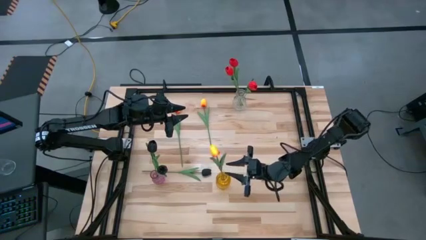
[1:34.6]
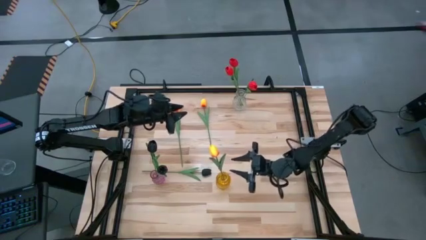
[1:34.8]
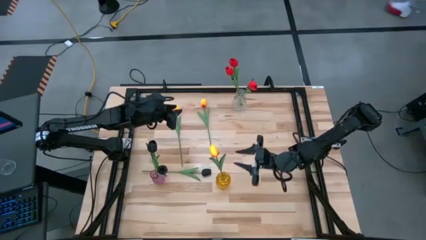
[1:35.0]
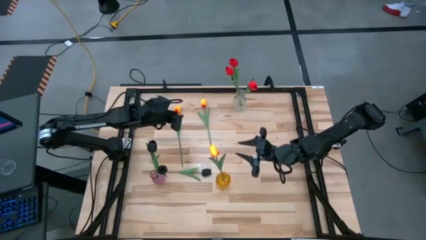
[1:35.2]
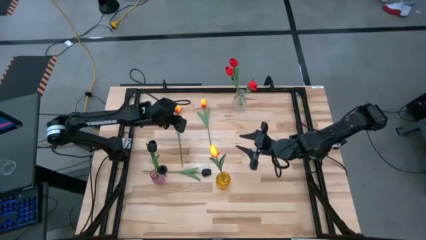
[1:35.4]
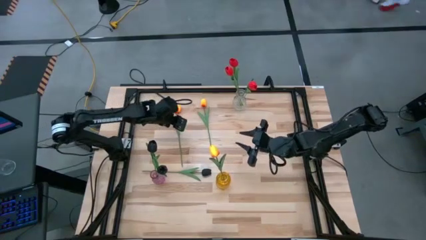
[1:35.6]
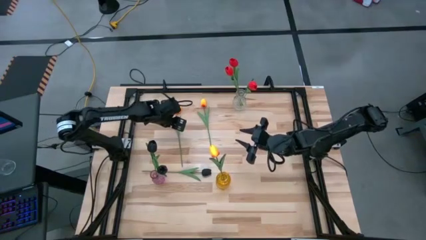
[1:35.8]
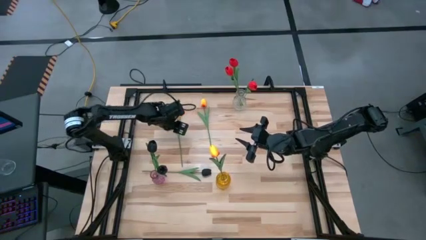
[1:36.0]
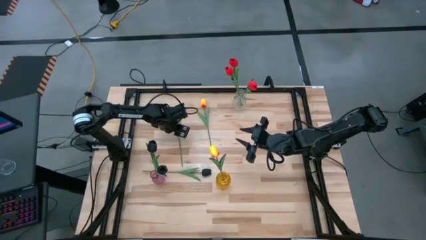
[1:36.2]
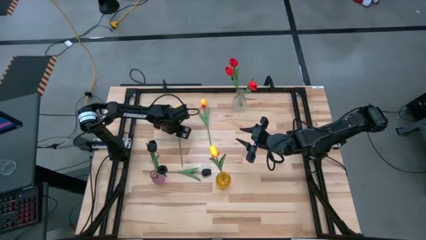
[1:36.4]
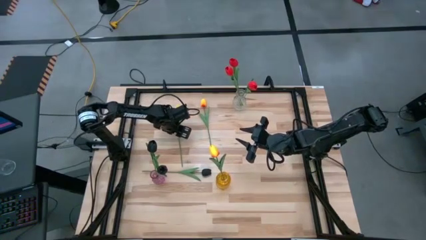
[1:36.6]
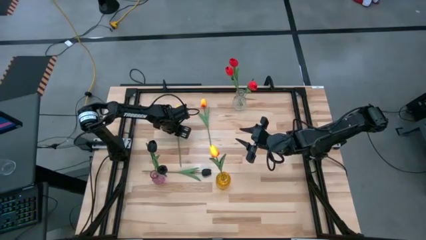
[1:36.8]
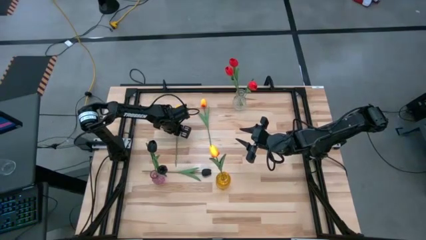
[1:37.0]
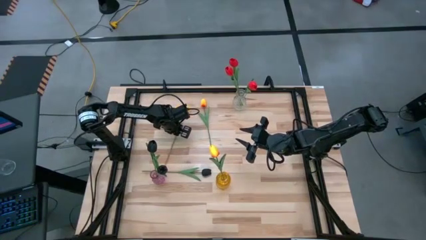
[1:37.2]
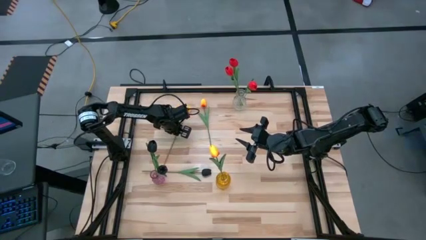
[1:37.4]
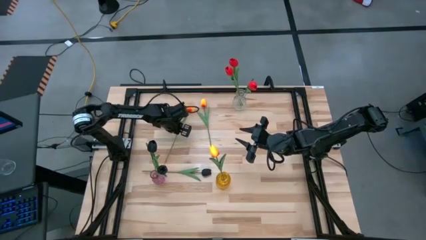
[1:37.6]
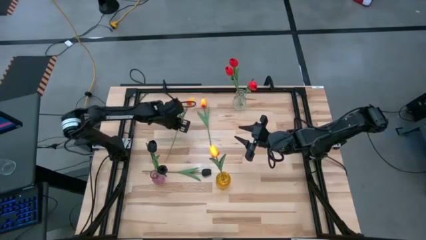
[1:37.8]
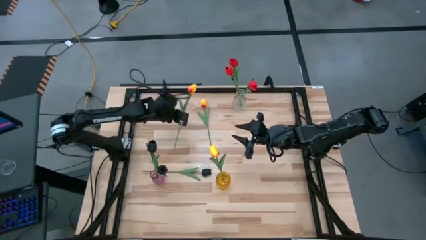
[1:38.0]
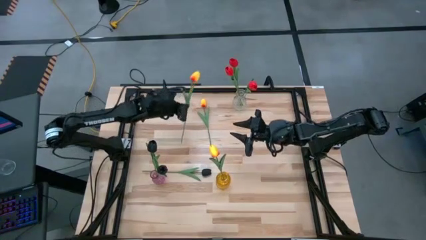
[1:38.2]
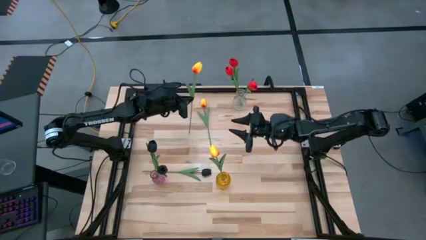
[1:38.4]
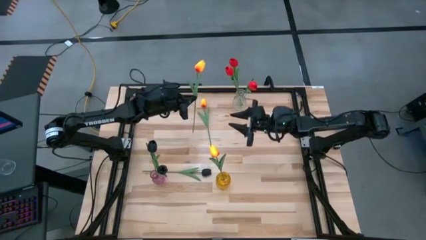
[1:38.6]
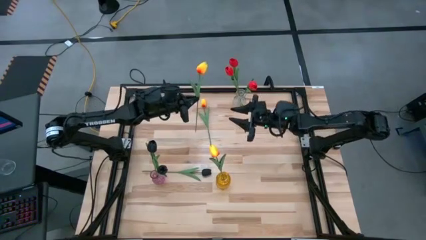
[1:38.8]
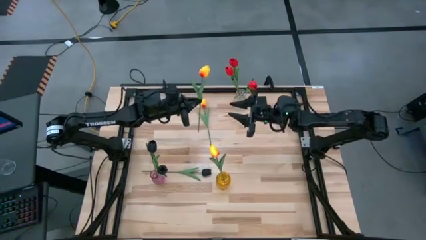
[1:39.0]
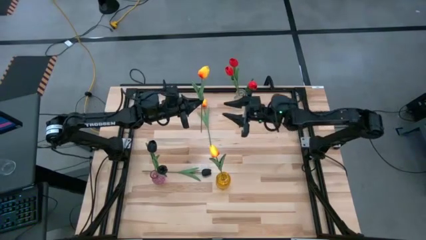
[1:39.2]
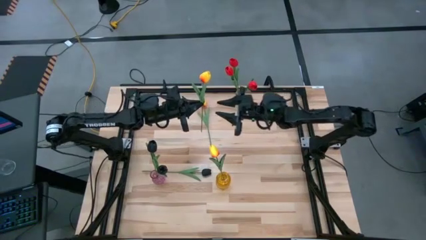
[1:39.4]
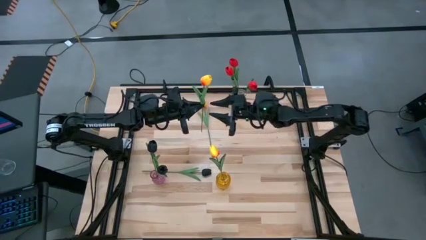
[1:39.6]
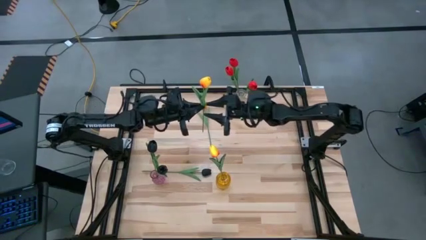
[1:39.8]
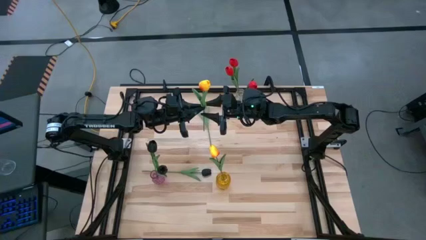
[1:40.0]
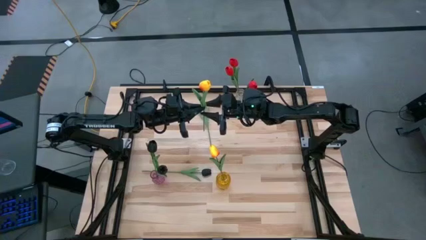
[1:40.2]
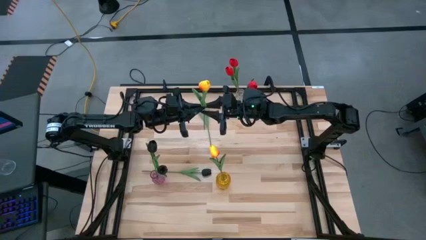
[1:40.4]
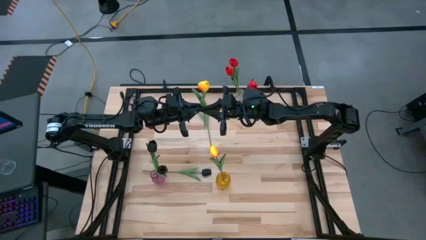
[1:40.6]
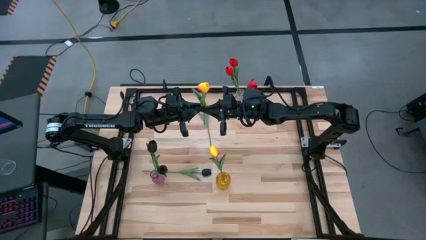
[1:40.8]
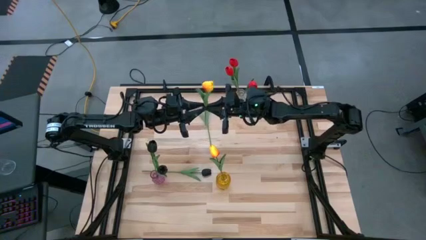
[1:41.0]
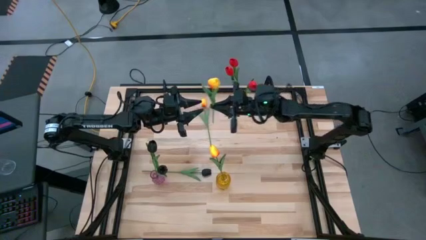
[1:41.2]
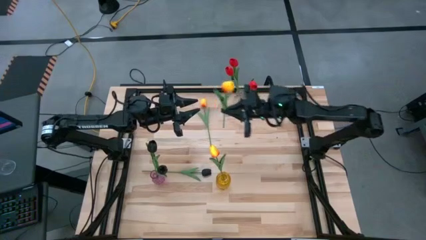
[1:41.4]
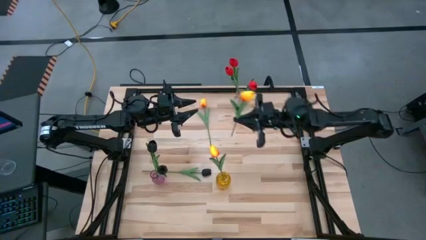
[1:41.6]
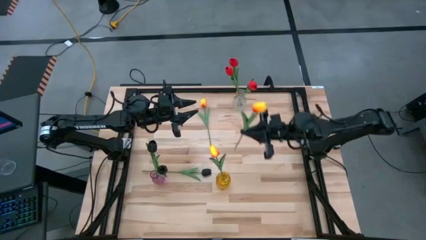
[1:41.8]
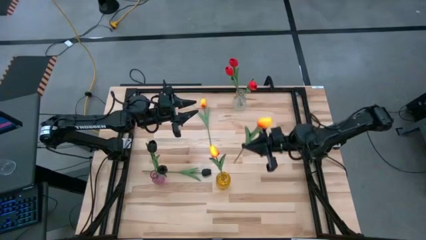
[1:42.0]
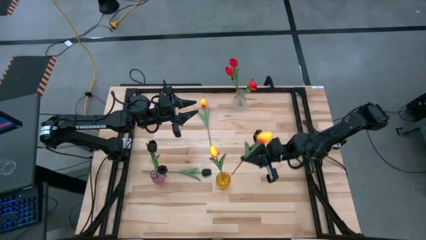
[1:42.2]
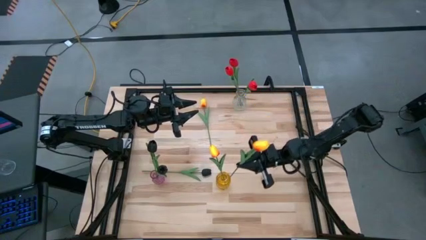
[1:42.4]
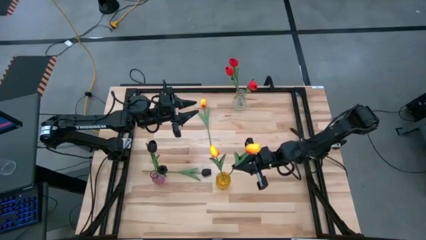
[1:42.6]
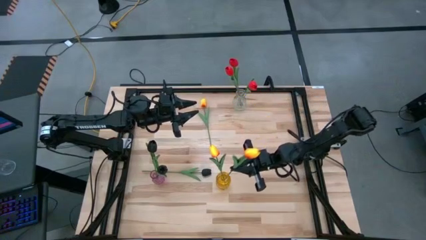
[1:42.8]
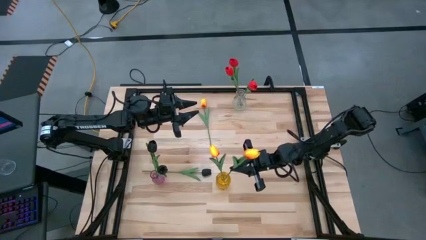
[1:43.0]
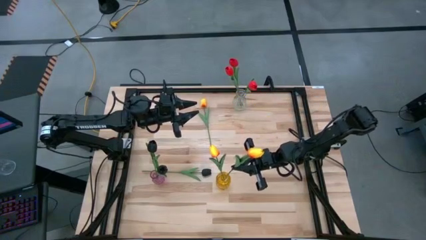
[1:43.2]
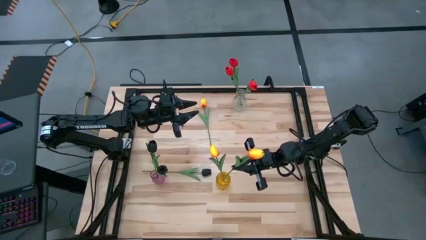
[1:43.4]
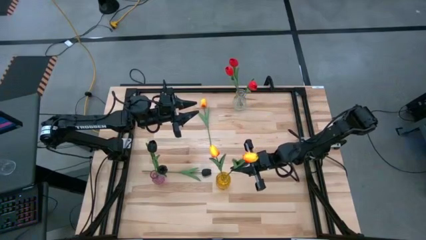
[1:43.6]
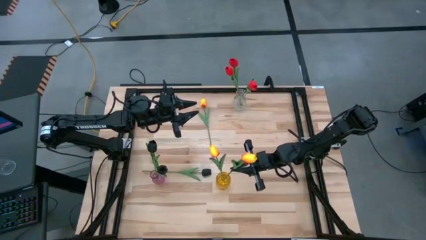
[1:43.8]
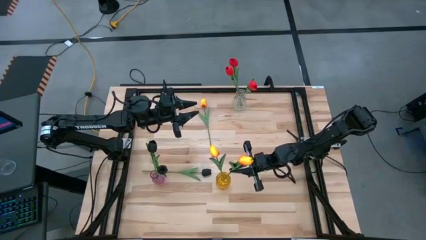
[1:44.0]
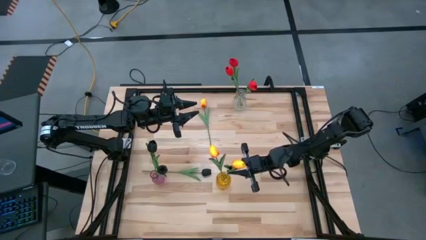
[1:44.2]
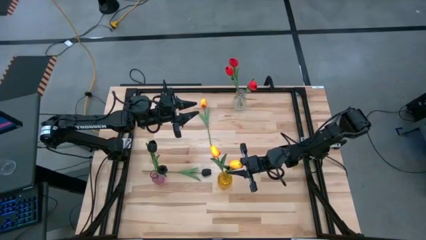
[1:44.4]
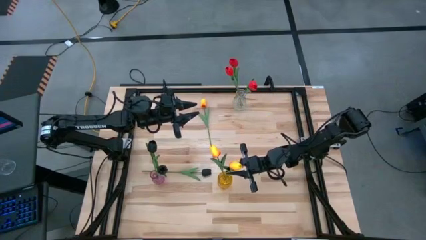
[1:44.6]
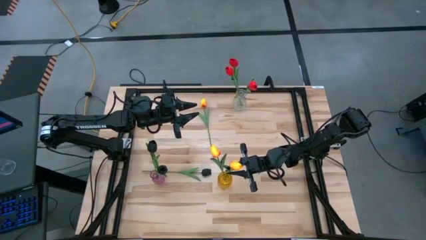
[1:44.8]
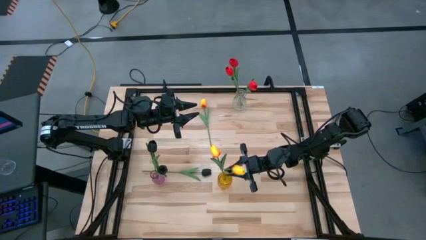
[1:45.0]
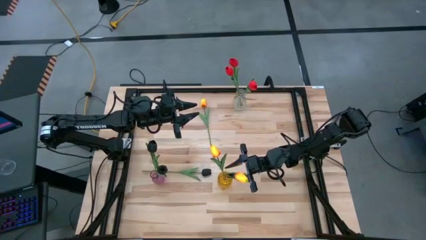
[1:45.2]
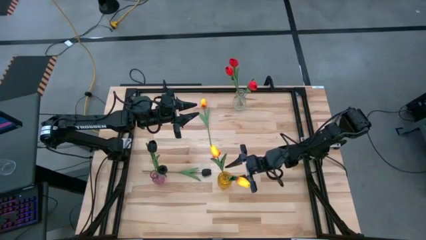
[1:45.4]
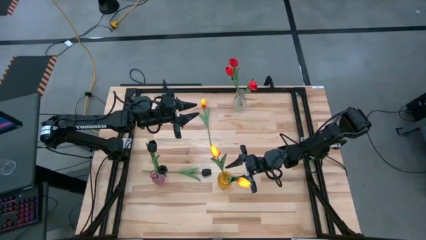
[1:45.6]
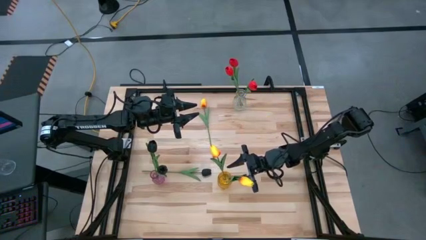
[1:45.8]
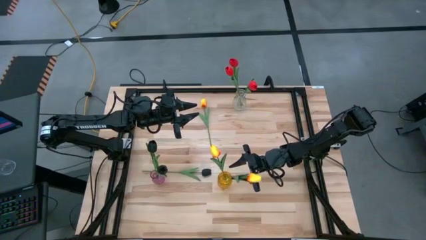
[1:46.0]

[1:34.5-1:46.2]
Task: Sort flowers into vase by color
Put the left yellow flower into the yellow vase

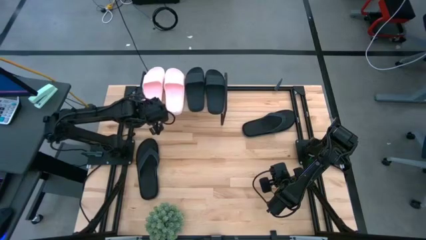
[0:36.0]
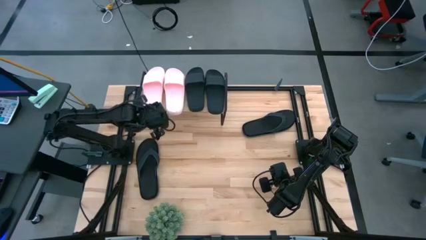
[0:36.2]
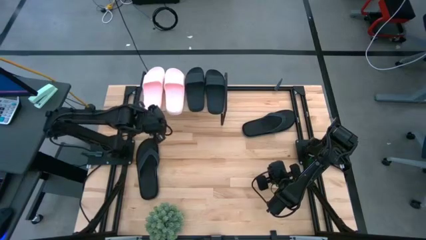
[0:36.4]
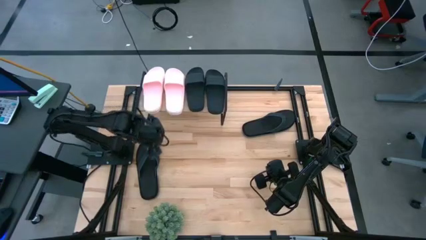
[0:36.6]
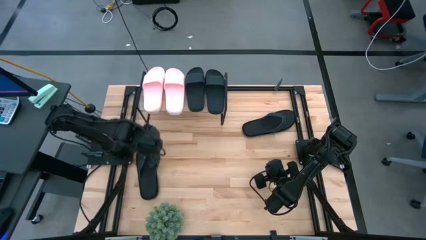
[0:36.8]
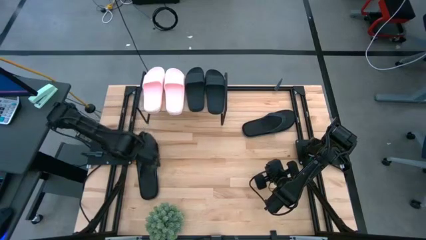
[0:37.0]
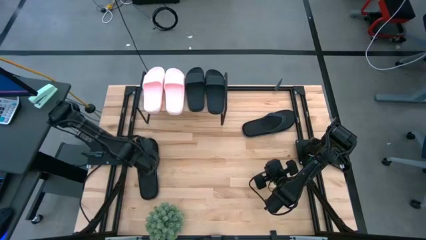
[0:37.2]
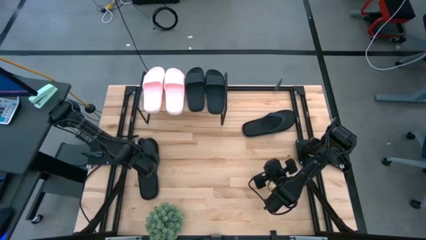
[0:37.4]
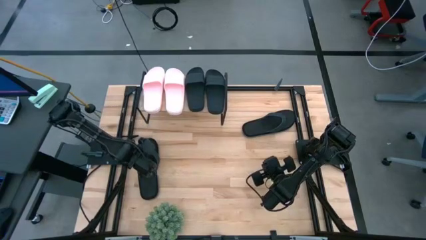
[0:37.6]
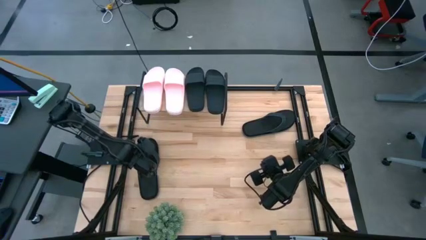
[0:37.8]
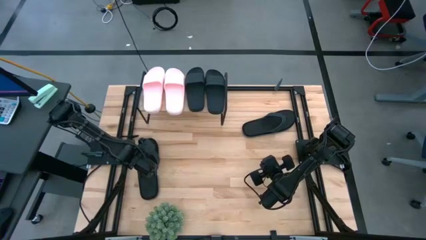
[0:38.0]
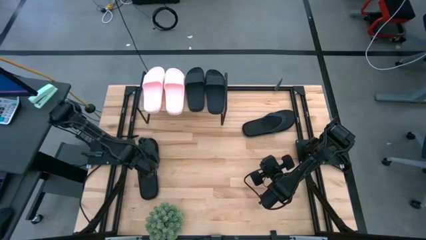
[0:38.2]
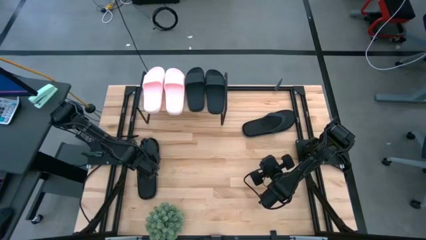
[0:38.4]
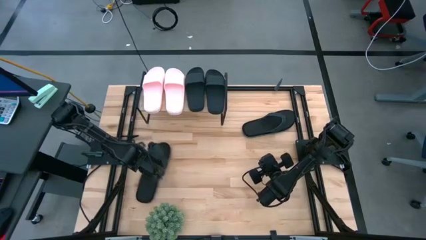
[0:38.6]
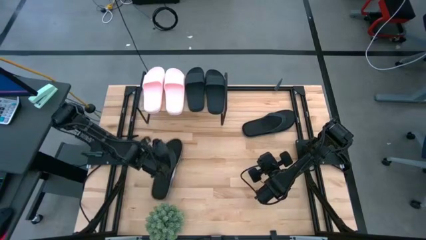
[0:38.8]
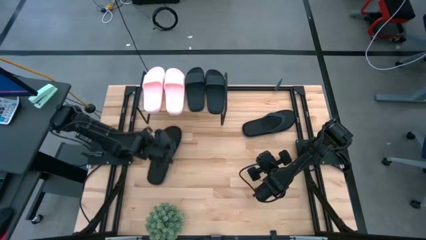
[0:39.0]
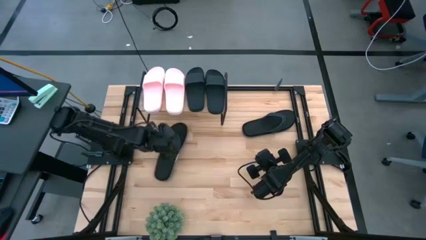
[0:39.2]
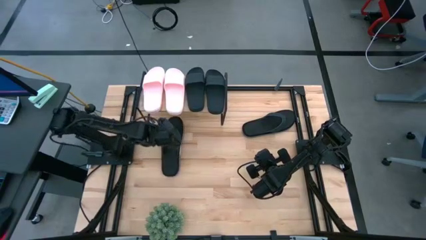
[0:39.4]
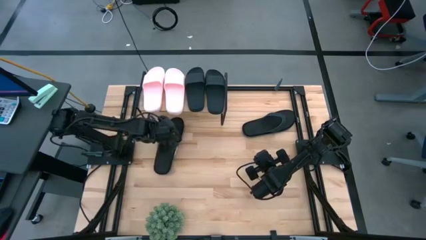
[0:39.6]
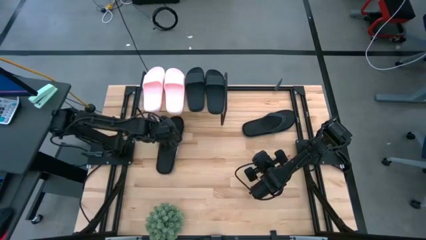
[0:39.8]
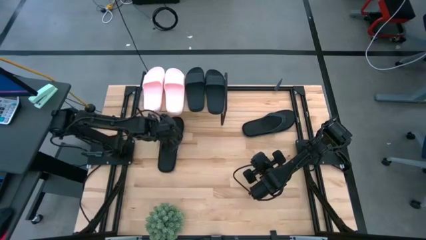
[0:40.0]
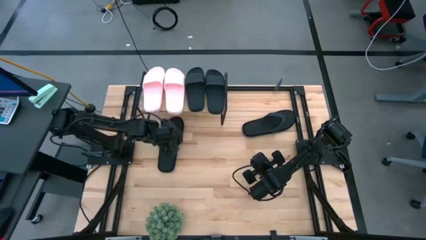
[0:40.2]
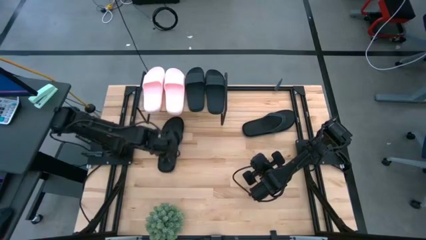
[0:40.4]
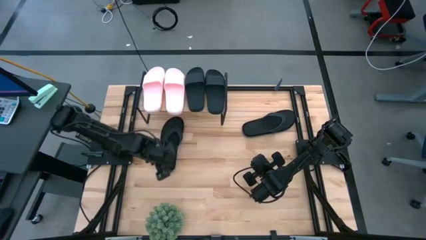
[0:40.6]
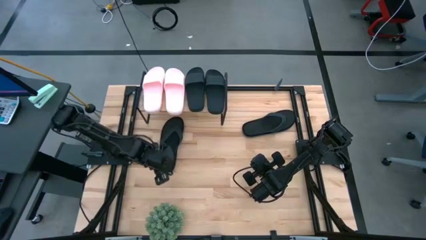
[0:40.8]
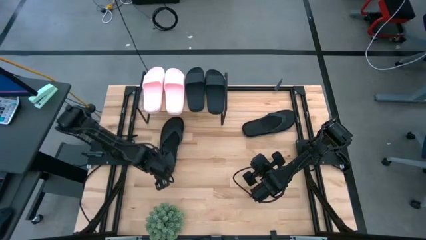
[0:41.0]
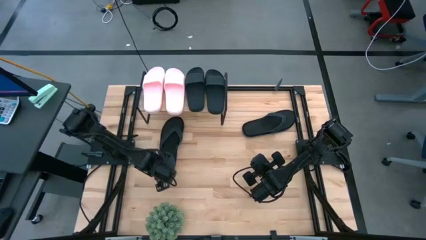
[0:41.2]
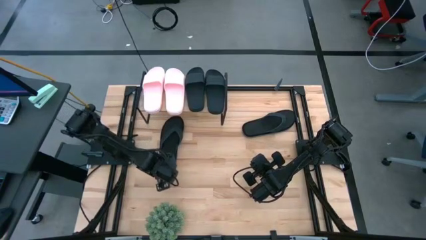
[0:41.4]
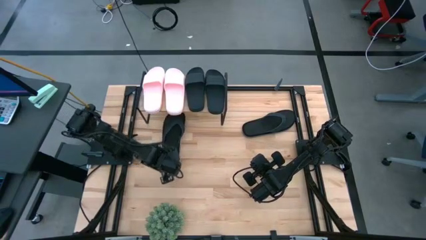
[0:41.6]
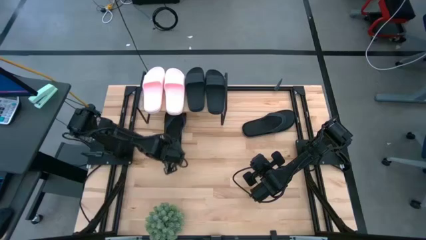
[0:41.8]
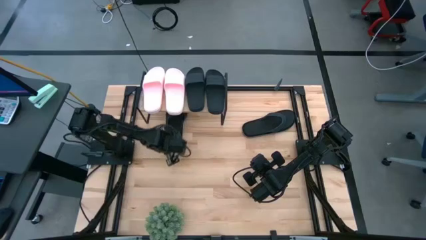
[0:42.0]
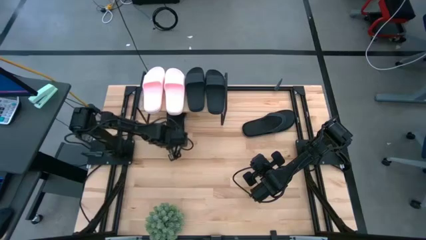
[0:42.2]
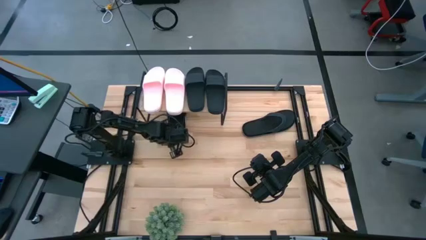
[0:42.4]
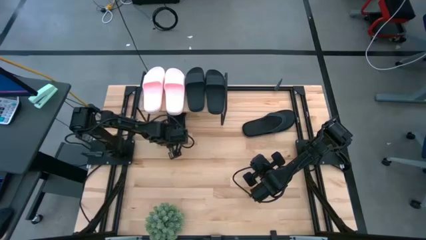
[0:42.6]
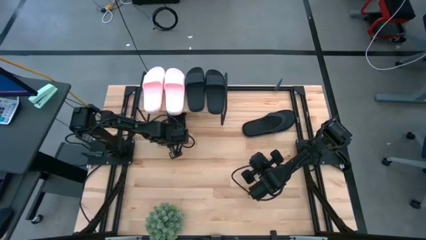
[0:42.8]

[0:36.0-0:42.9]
Task: Pick and place slides into the shelf
Put the left black slipper under the shelf
